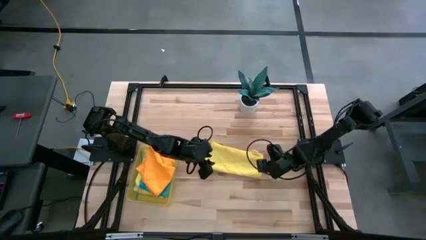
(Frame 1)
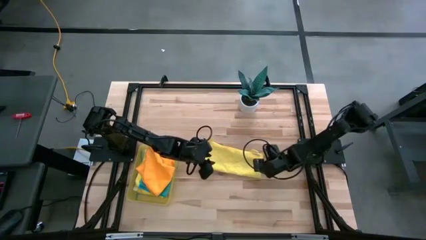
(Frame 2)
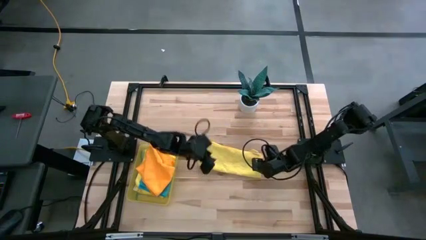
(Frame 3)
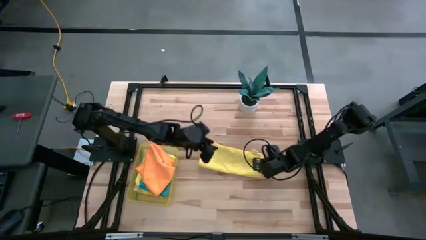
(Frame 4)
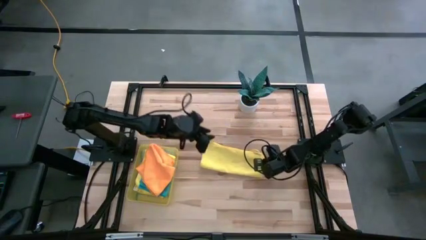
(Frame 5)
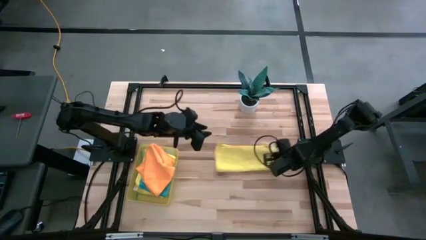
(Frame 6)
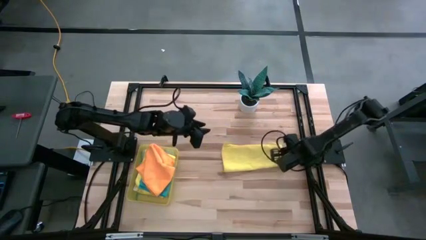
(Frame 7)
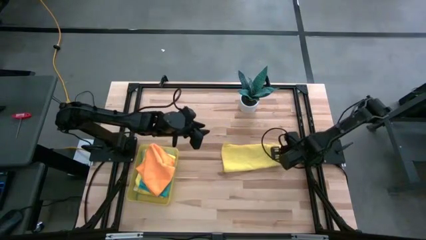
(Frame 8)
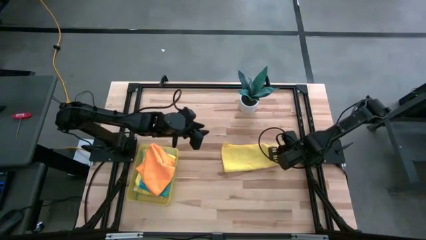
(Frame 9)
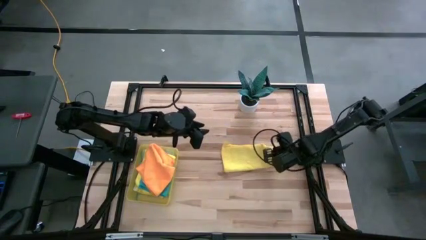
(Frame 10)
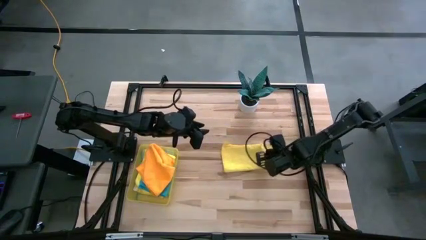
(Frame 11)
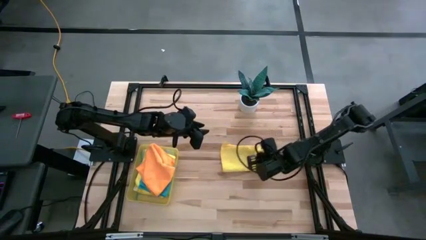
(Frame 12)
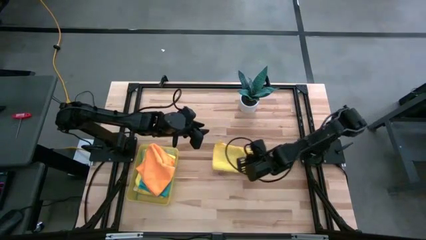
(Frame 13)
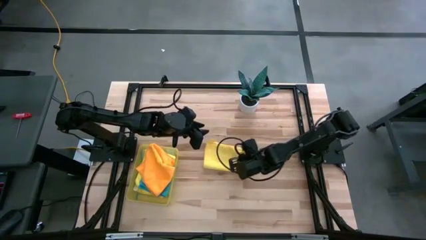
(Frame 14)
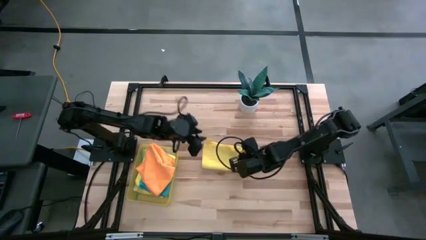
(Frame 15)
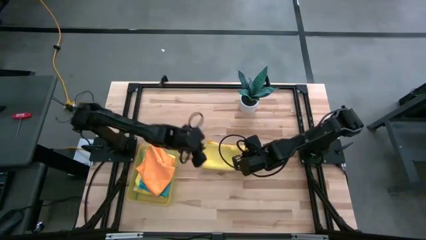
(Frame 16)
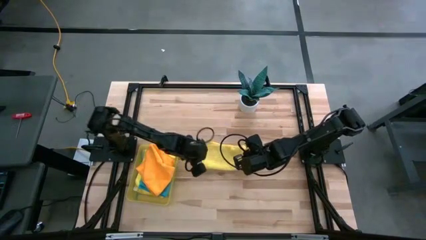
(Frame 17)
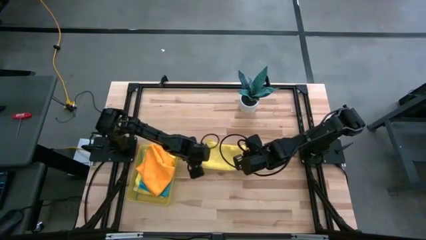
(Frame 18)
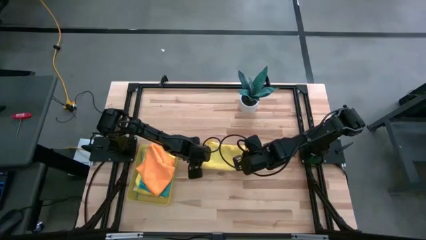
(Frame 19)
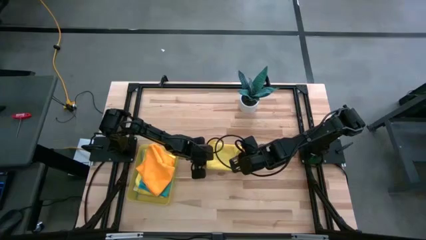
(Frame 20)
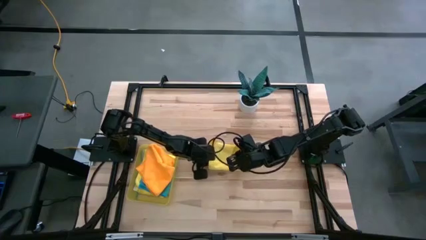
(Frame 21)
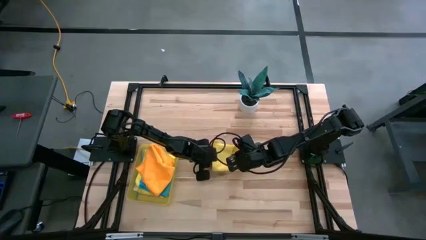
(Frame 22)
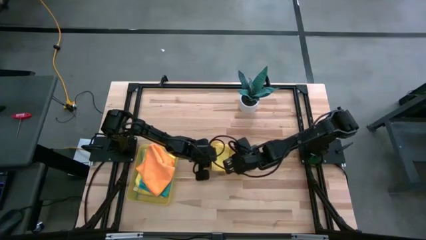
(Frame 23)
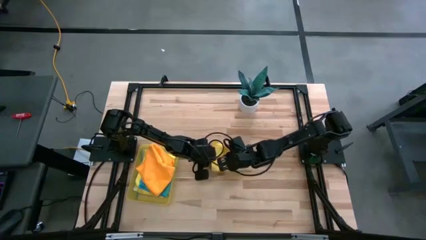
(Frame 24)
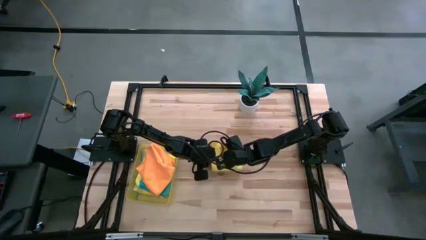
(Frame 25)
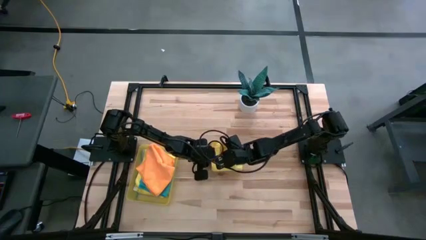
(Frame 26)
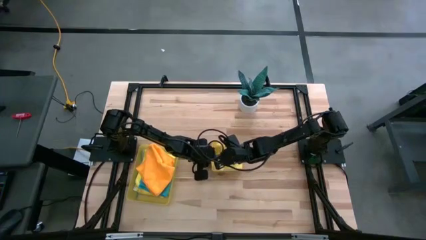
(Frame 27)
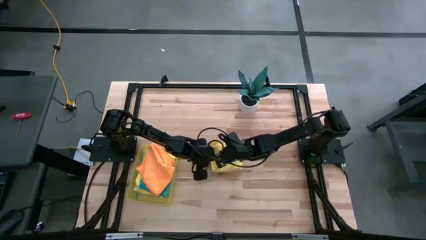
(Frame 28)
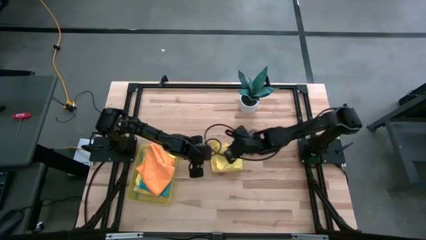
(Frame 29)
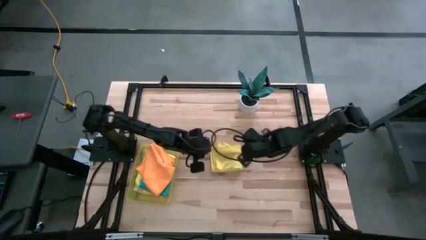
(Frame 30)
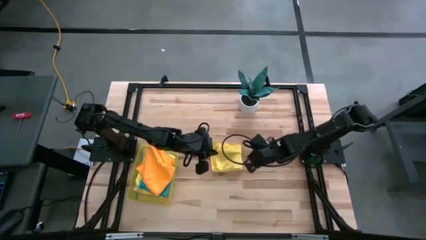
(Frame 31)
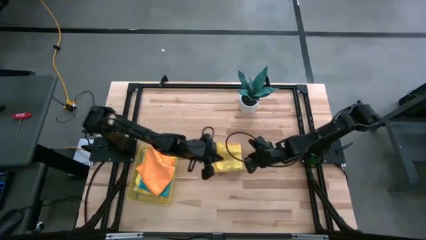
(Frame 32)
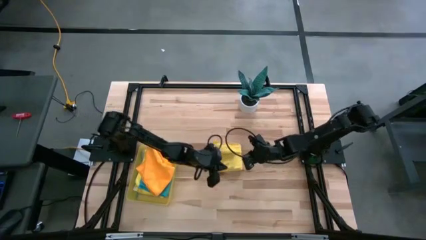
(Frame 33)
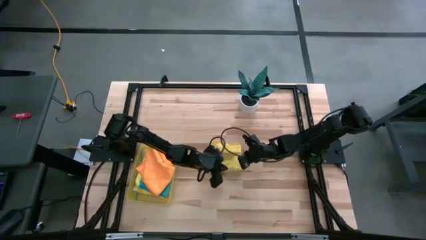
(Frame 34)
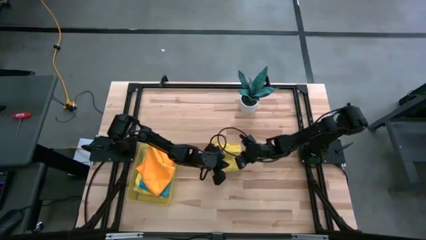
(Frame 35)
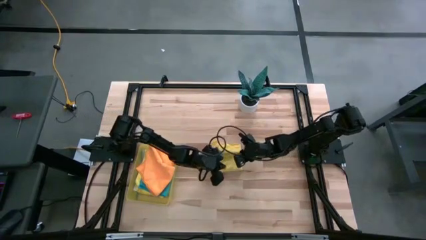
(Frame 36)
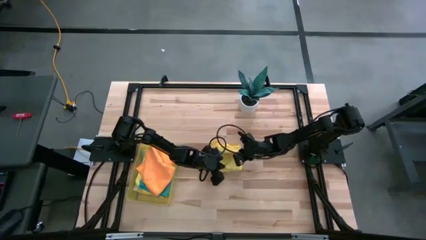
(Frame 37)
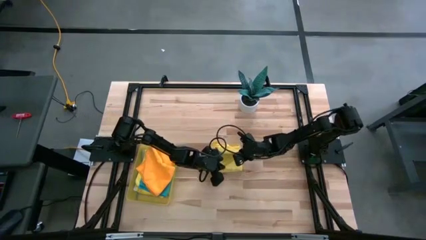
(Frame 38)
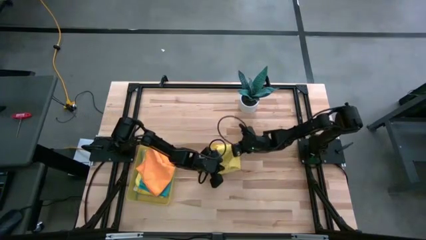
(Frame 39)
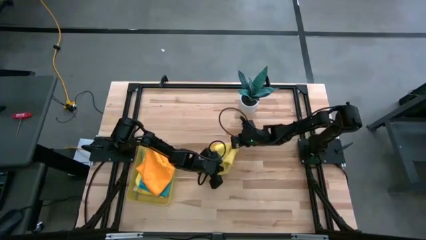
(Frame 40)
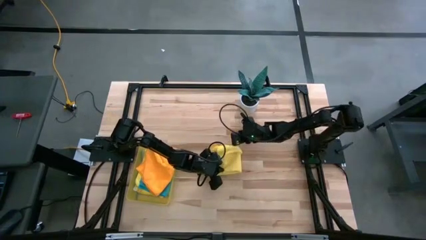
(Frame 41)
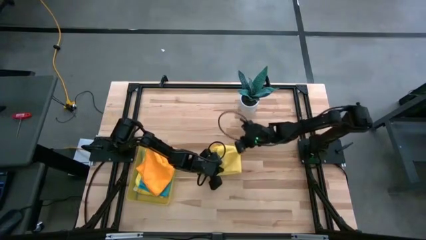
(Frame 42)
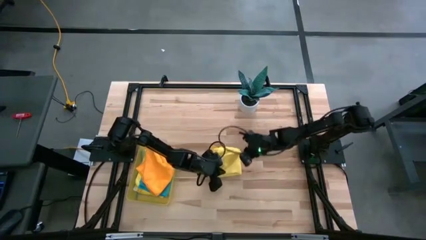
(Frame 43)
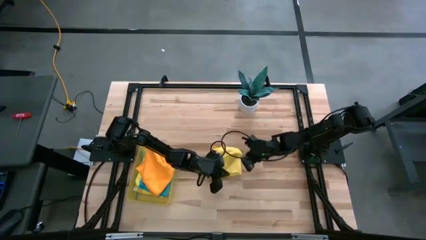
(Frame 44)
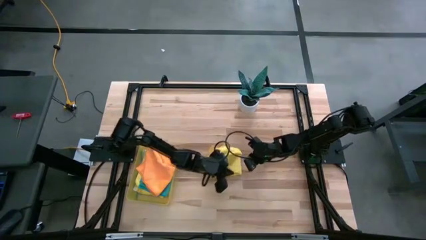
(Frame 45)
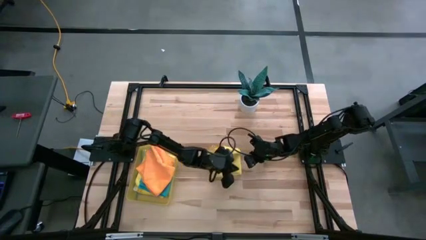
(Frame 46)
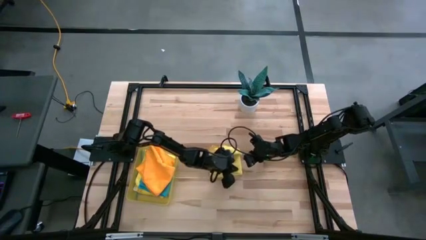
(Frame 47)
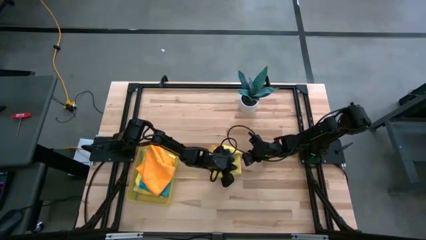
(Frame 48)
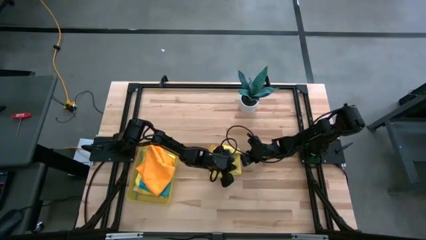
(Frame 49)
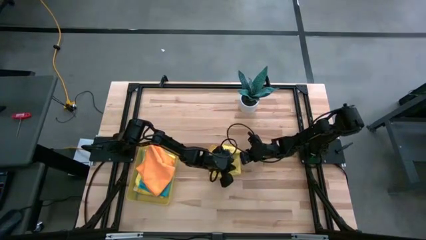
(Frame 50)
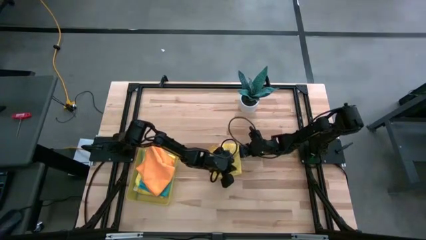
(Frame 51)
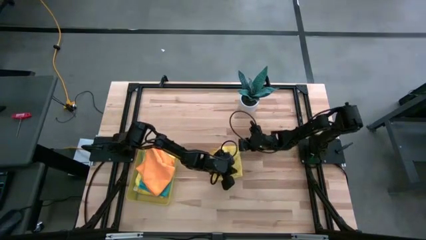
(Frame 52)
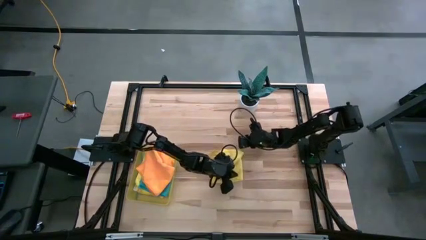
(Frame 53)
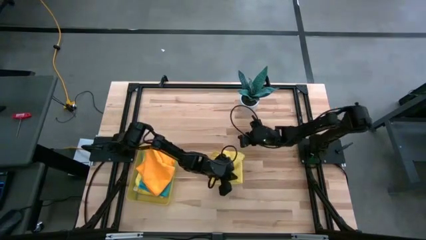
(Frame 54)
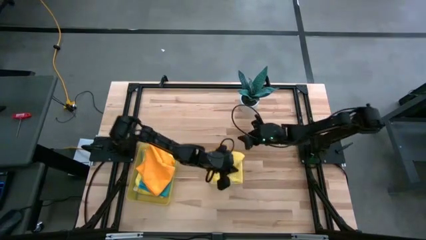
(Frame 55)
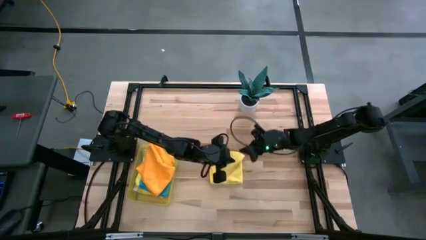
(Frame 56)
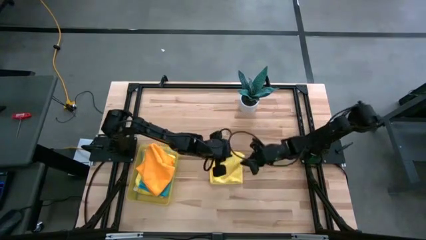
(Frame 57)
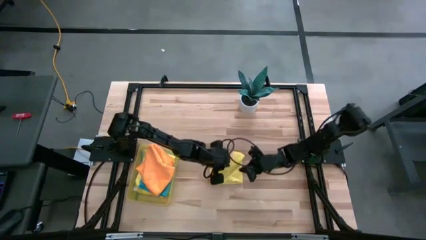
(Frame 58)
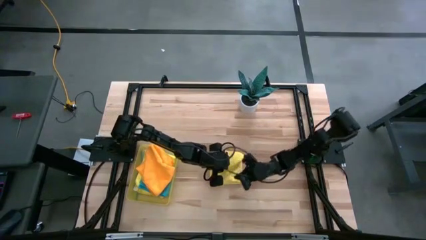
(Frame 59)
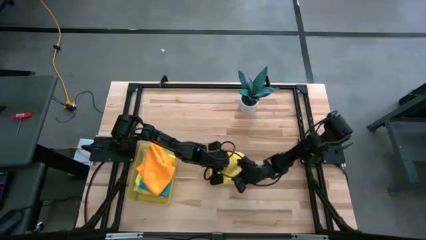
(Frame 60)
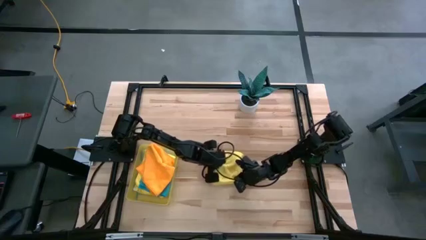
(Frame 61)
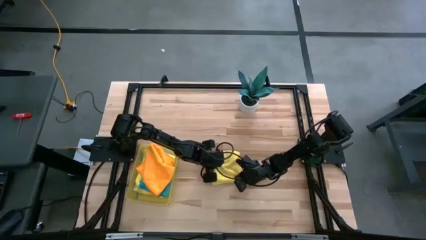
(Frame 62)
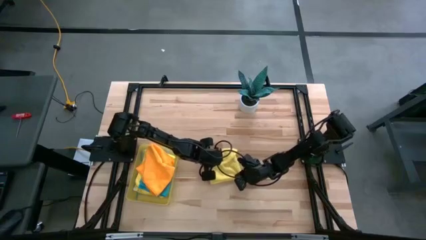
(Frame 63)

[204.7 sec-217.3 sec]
Task: Fold microfiber towels
Fold the yellow microfiber cloth
